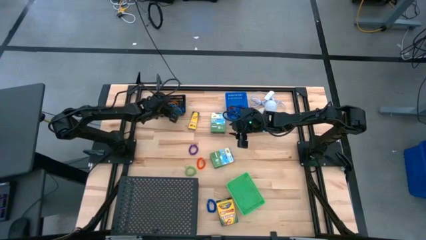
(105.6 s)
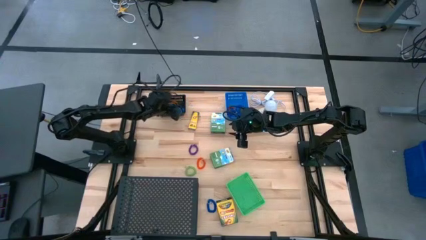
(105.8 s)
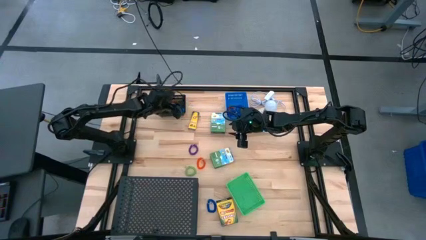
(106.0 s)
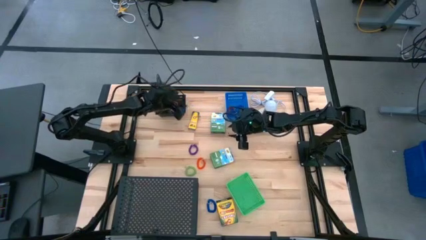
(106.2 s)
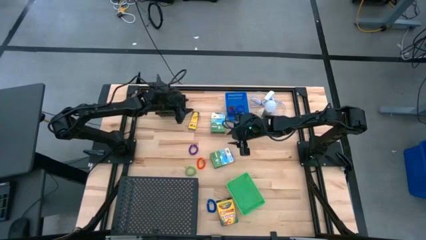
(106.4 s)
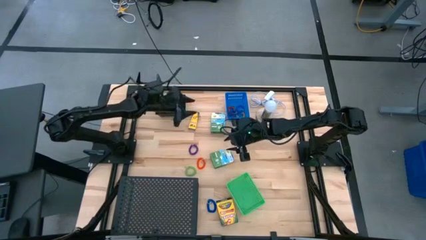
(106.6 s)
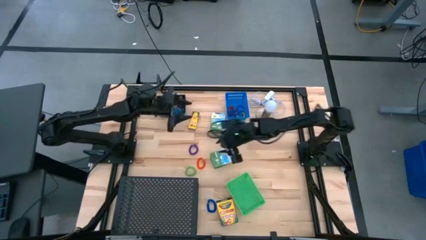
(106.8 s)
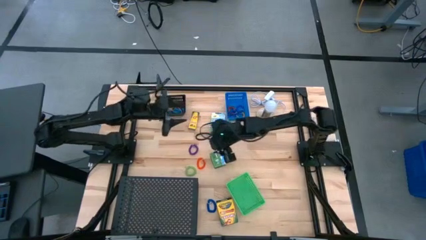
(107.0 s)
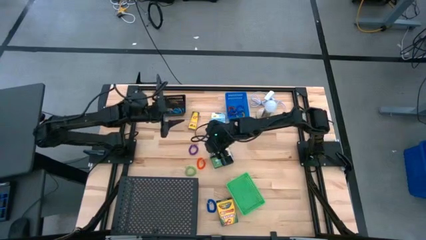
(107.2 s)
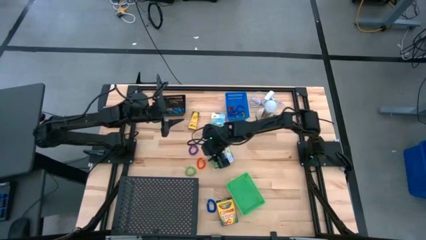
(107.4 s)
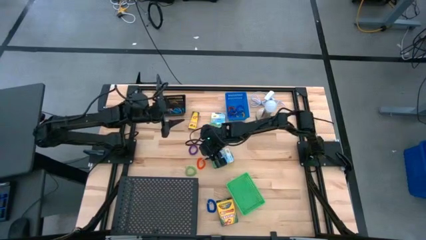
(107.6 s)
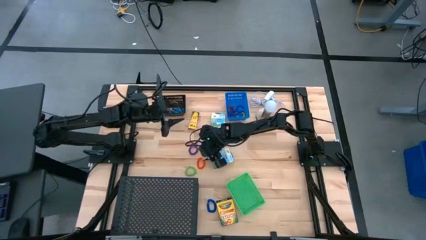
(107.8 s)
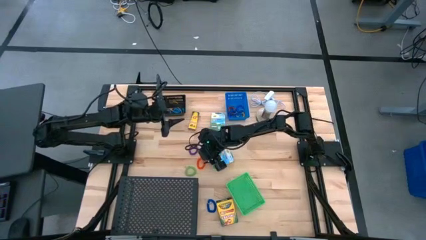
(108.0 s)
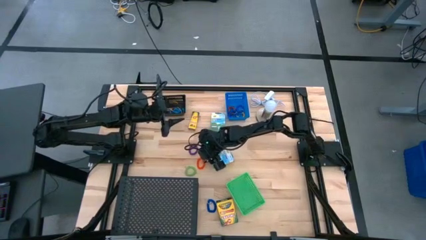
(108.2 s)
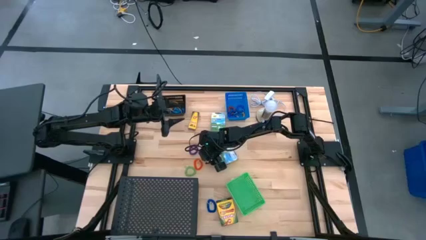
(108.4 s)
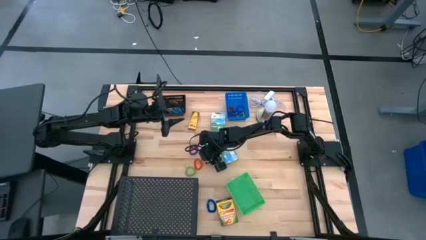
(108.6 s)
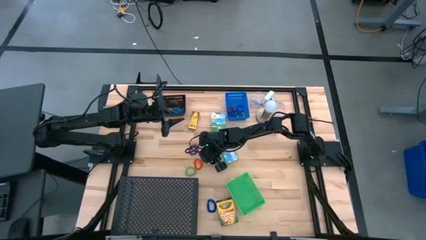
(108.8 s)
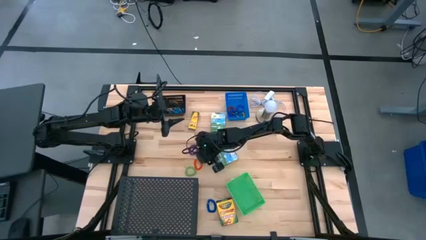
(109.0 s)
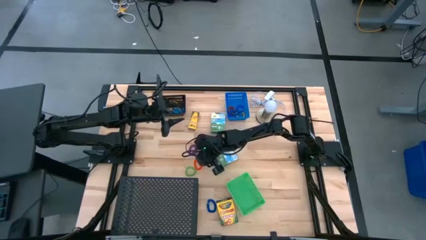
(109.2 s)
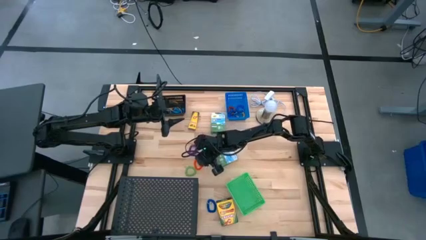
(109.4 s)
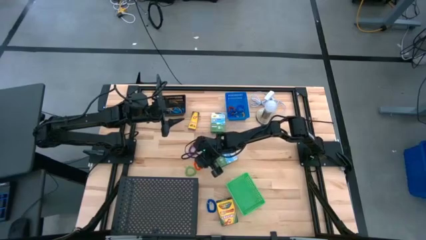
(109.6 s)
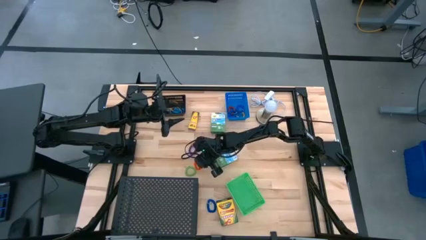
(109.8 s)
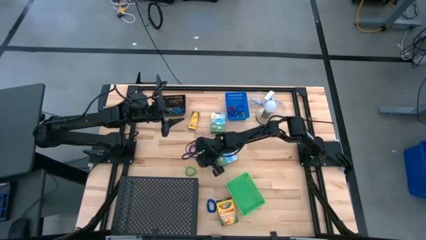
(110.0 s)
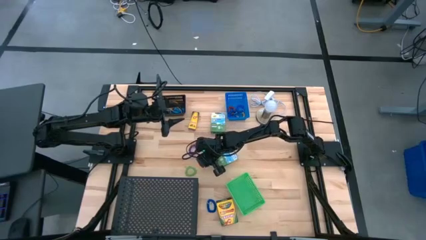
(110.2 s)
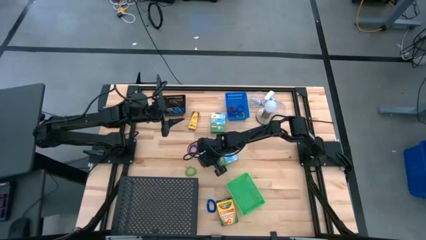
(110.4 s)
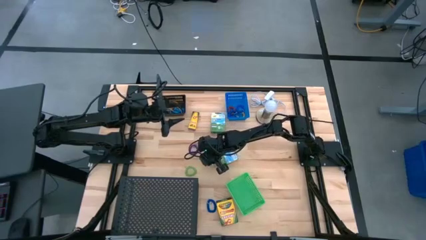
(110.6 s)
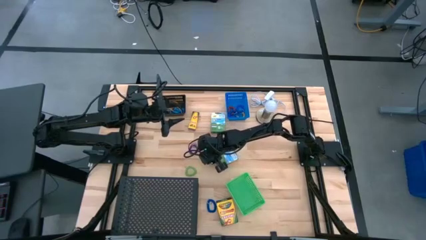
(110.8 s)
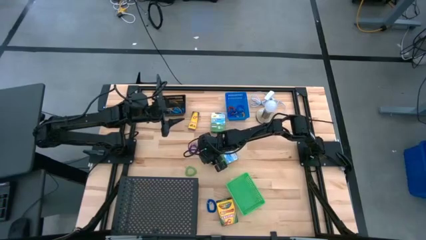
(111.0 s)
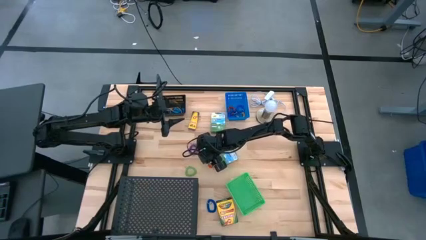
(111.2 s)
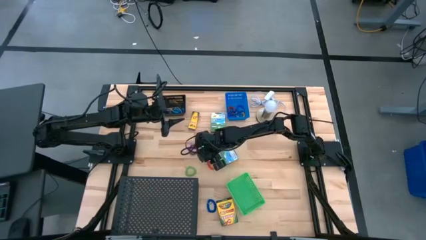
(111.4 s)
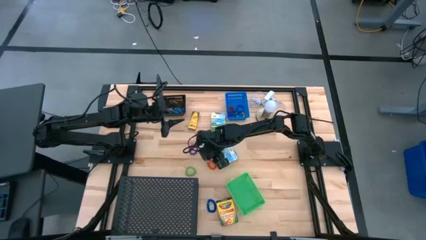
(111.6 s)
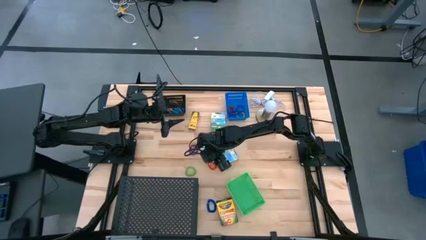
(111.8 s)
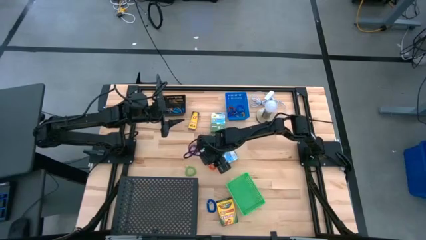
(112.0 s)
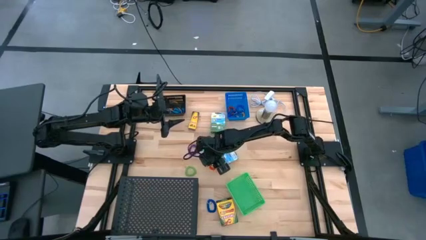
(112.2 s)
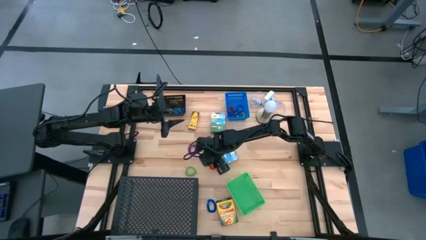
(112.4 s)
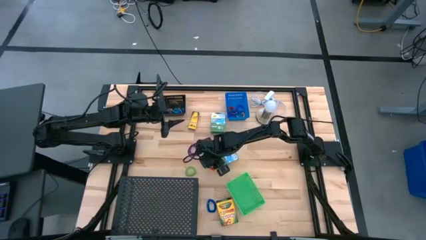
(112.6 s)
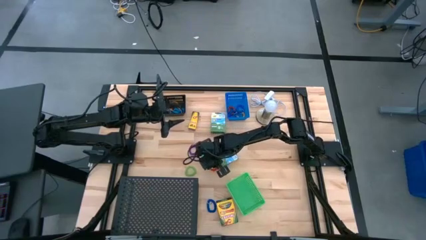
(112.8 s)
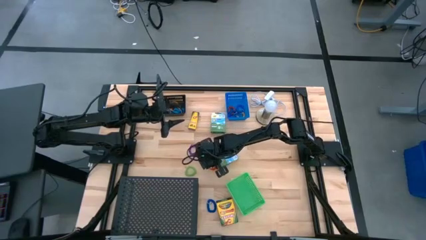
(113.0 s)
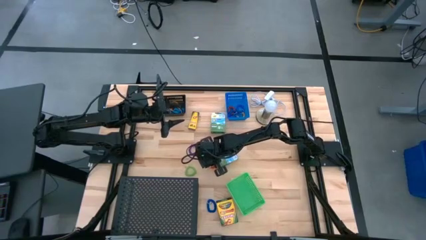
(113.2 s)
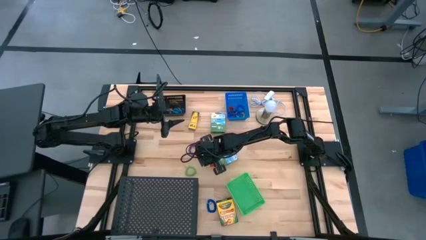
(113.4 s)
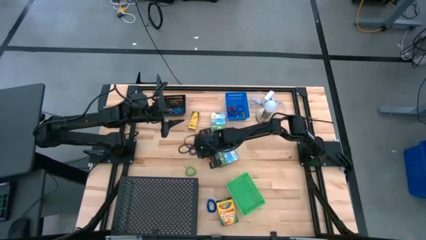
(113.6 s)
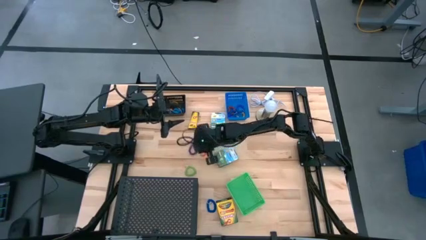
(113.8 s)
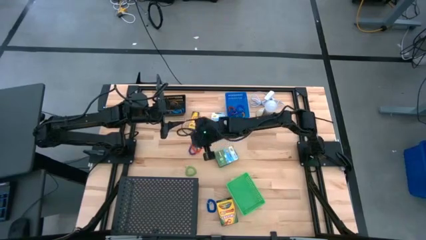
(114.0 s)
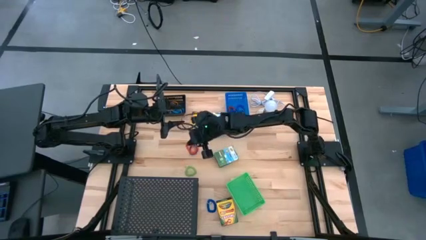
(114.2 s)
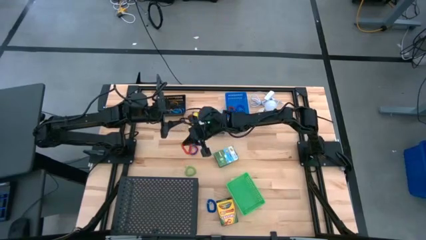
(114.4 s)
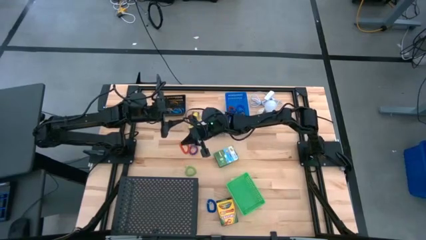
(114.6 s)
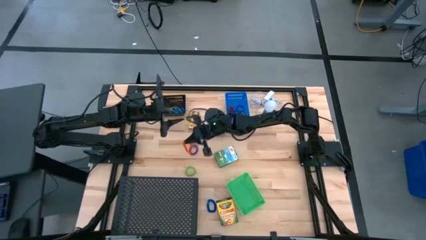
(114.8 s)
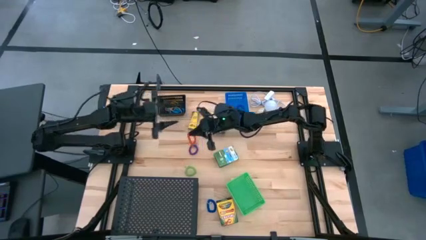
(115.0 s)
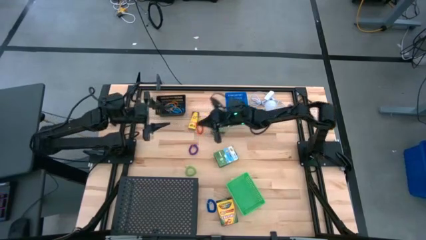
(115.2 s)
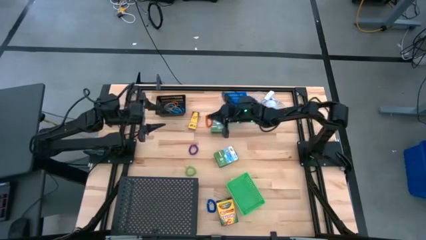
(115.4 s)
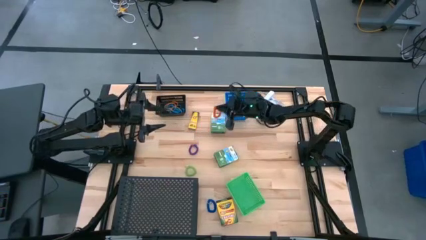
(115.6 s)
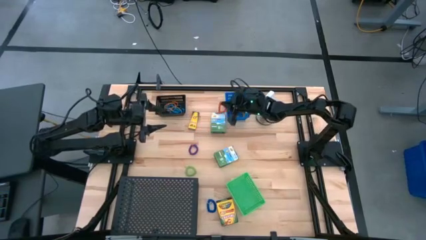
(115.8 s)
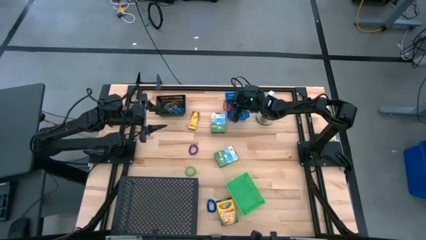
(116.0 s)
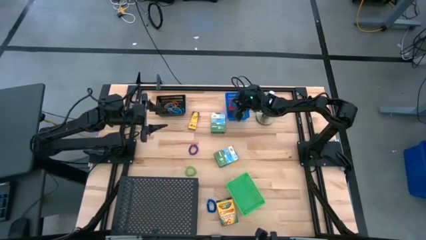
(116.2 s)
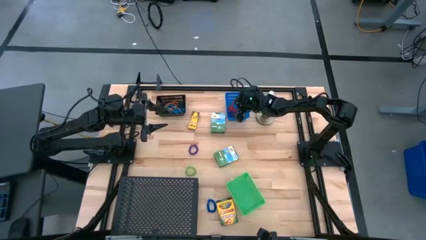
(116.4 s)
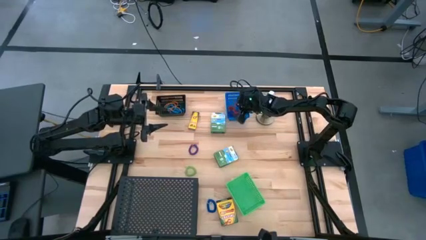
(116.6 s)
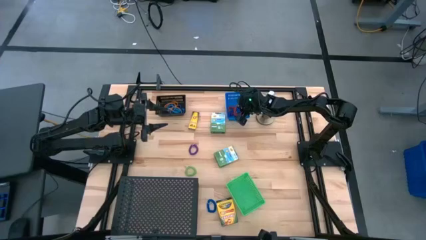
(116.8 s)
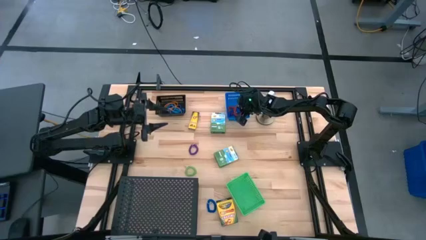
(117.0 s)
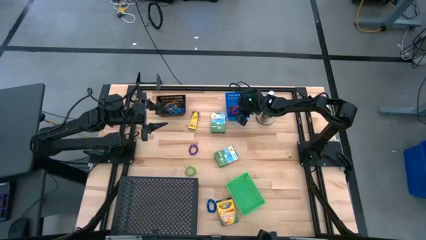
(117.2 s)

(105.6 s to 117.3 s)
Task: Pick & Place Office Desk Supplies
Put the orange spring keychain into the blue bin

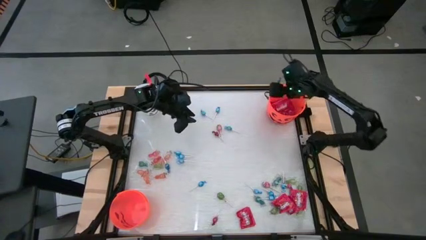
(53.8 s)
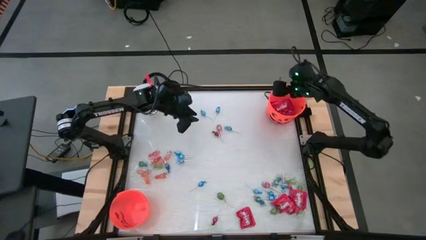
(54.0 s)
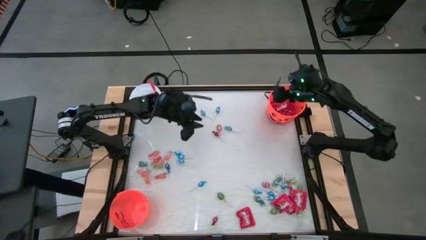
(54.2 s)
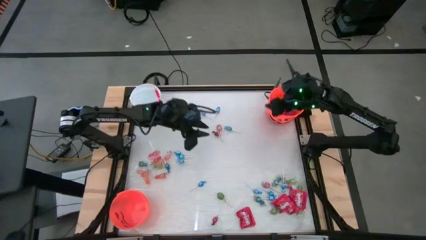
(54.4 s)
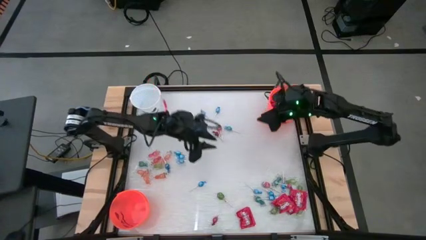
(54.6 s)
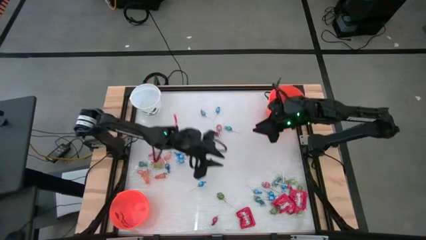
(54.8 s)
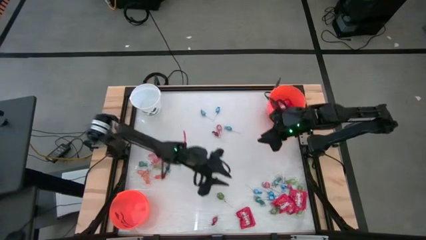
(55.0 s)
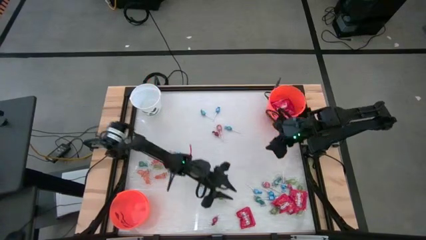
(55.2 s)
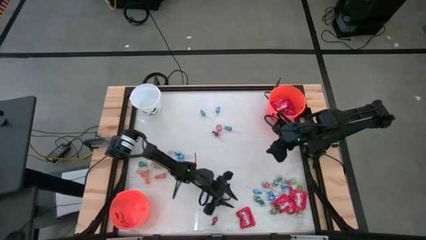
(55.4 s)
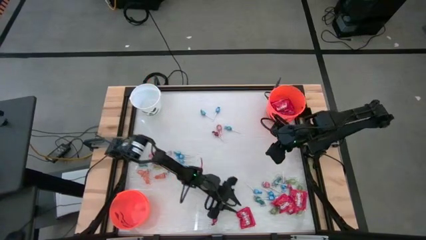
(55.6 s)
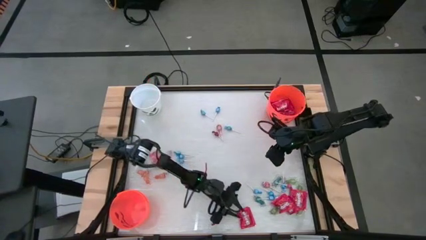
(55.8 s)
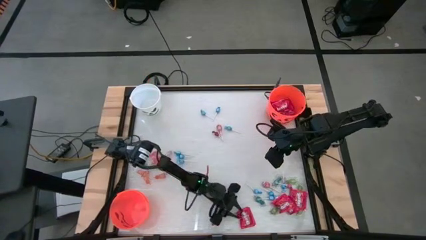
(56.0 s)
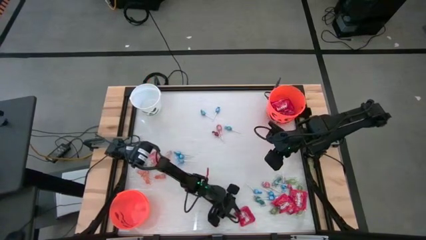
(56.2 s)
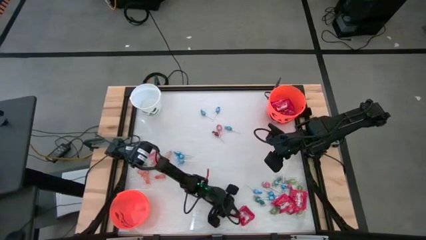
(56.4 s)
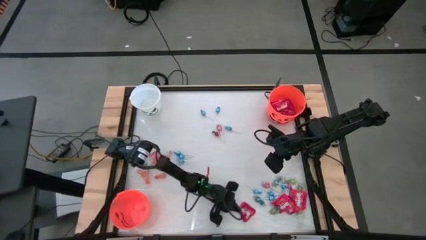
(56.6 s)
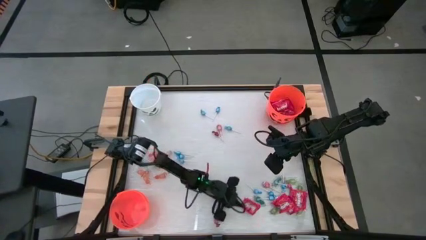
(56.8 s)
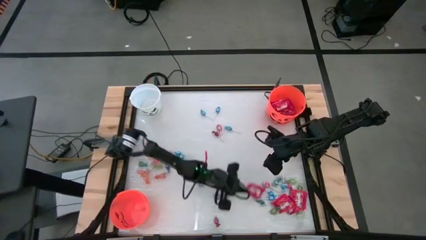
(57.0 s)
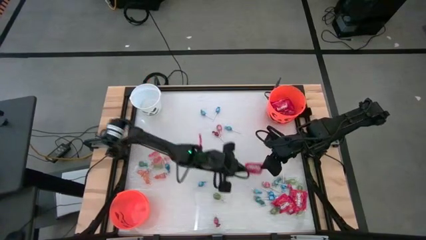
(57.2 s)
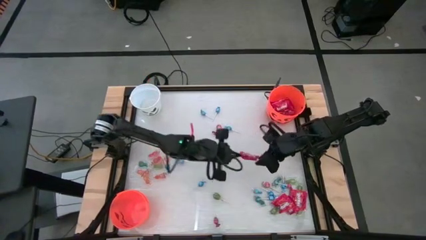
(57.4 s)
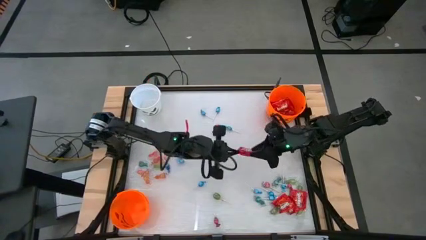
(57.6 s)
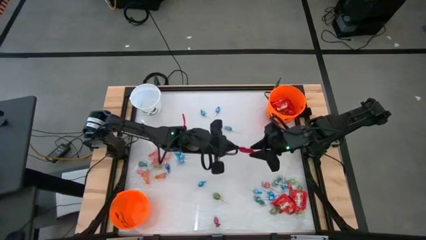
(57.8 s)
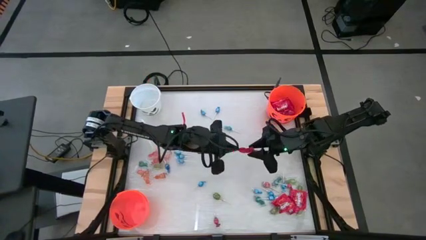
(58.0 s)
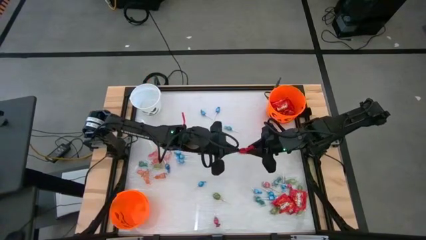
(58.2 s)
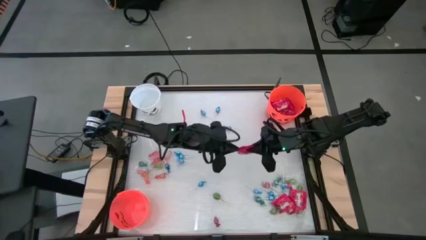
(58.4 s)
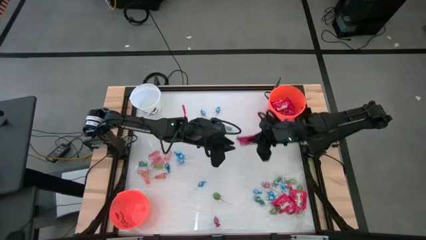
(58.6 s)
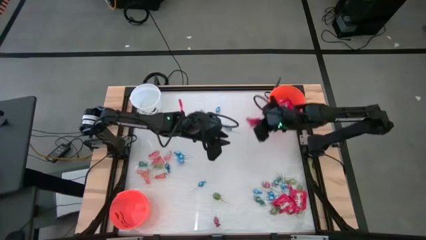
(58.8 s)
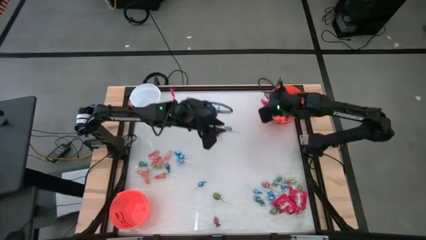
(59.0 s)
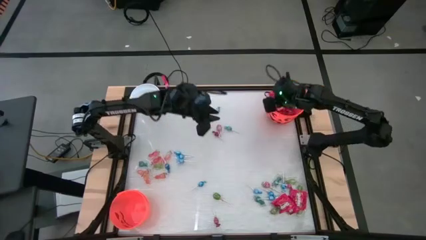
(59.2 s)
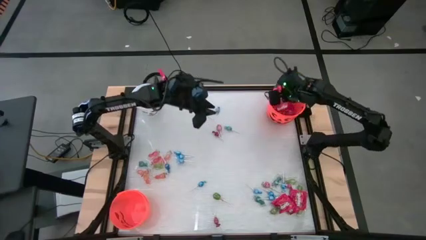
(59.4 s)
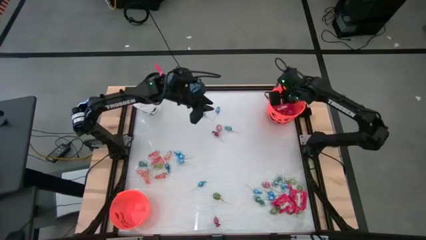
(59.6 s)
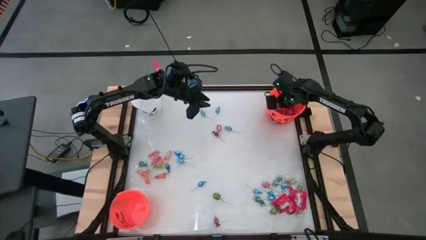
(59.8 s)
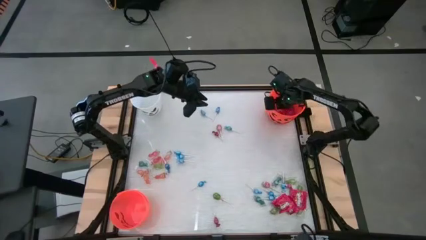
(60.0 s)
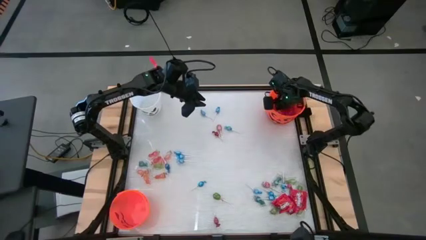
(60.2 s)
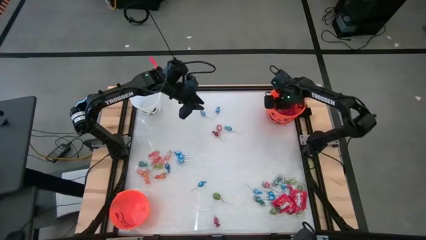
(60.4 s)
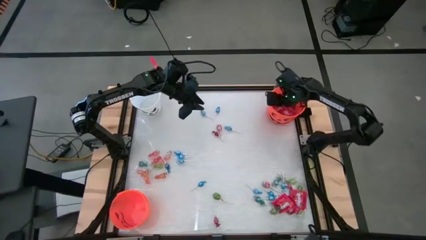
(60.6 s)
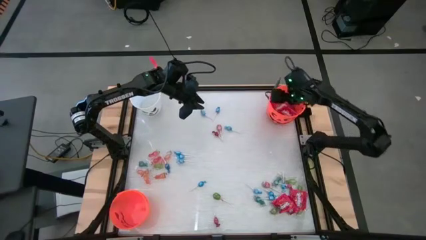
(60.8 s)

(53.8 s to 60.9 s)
Task: Sort candy by brand, put in halloween buckets
Put the red candy into the top orange bucket
